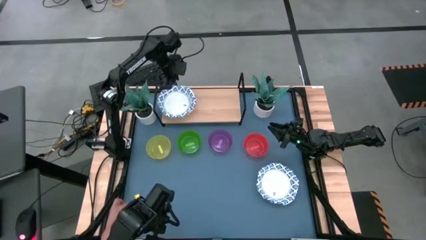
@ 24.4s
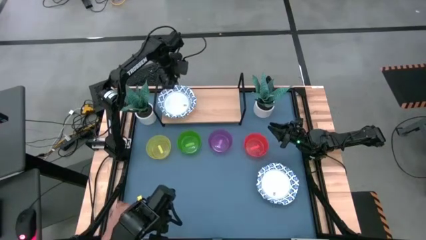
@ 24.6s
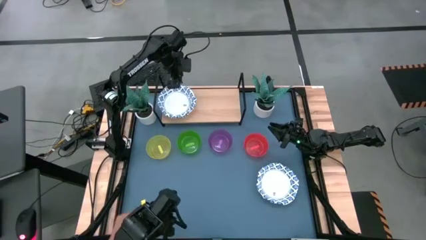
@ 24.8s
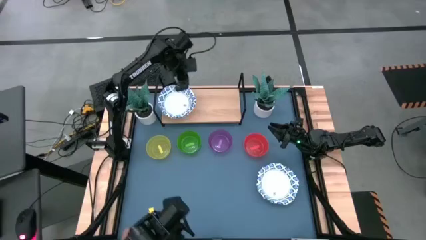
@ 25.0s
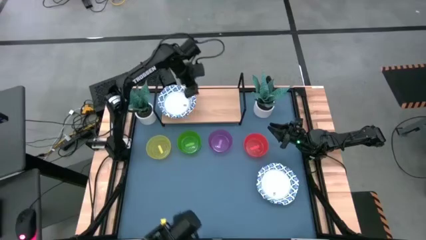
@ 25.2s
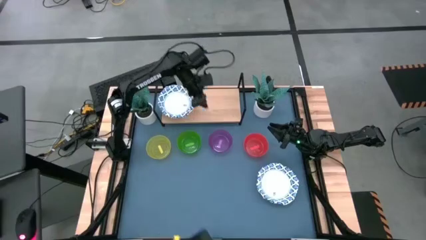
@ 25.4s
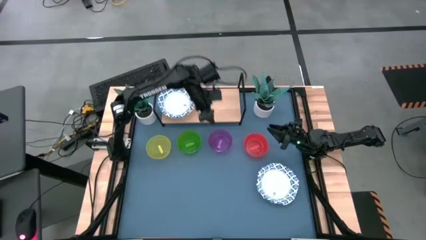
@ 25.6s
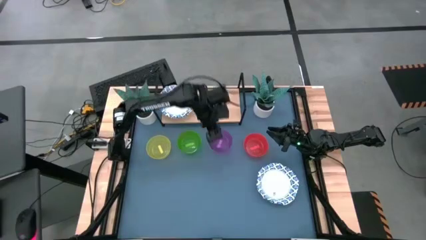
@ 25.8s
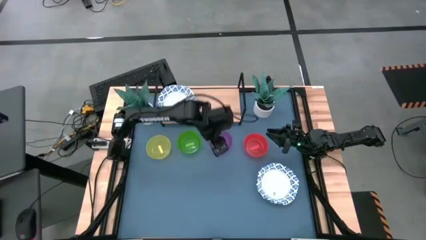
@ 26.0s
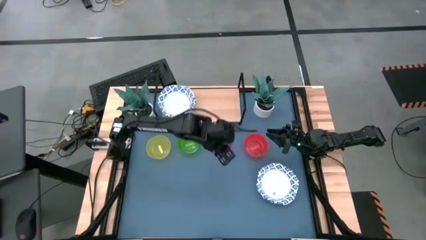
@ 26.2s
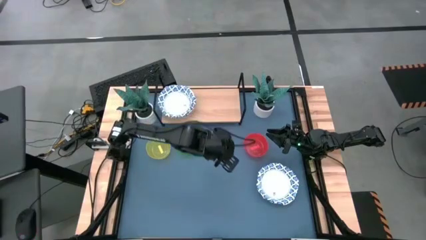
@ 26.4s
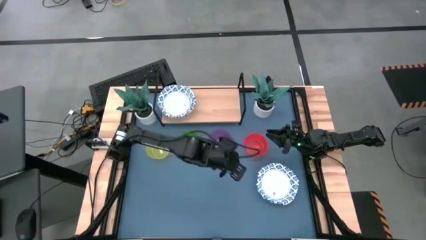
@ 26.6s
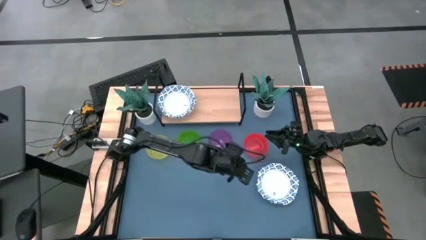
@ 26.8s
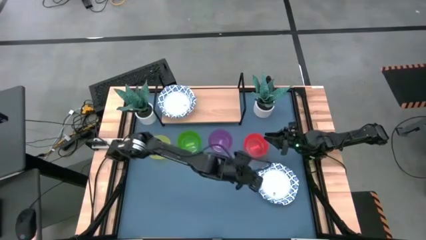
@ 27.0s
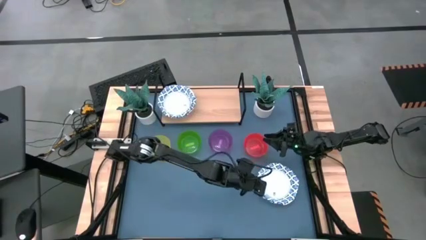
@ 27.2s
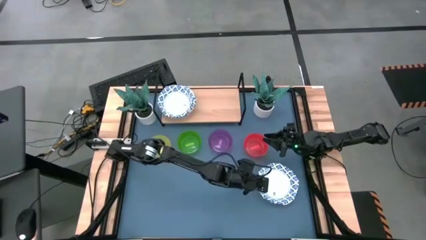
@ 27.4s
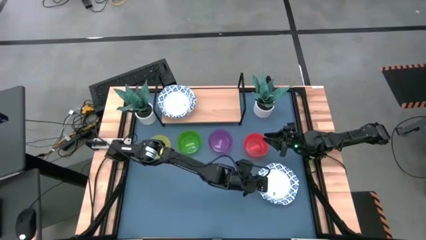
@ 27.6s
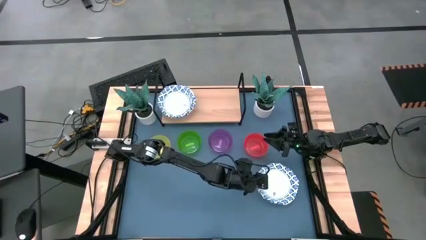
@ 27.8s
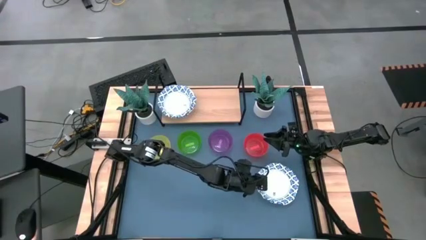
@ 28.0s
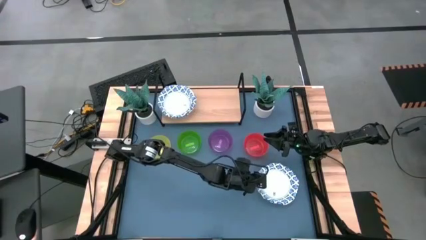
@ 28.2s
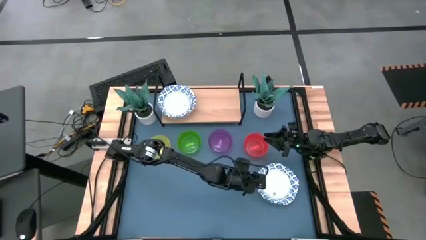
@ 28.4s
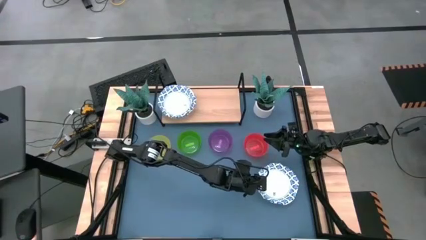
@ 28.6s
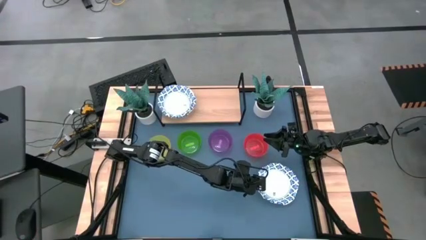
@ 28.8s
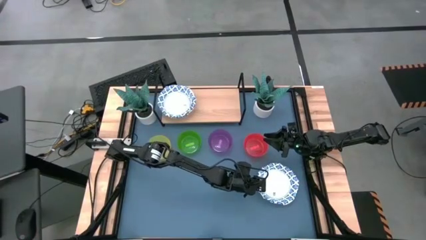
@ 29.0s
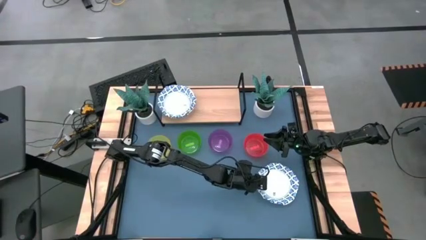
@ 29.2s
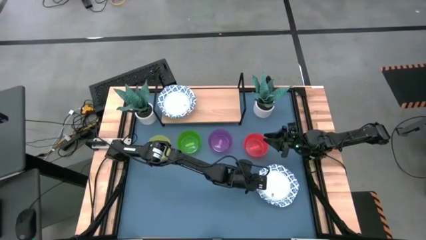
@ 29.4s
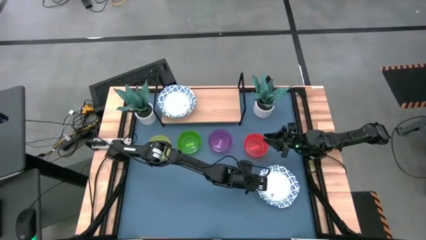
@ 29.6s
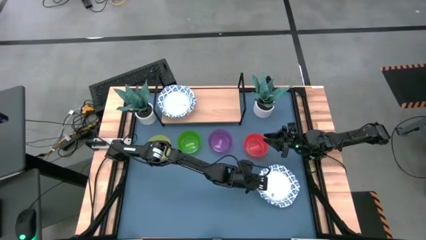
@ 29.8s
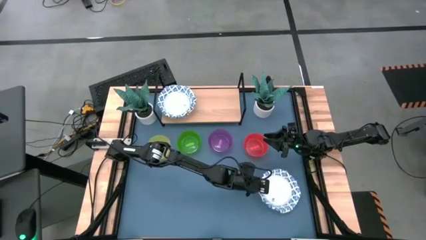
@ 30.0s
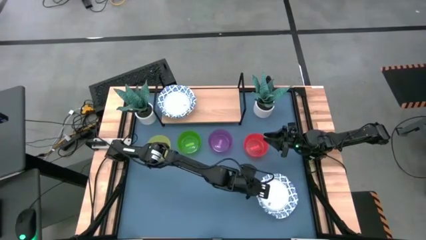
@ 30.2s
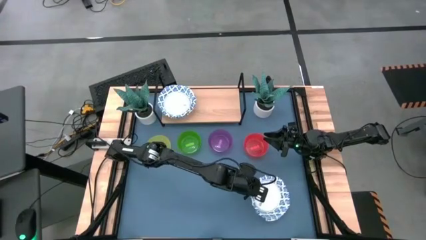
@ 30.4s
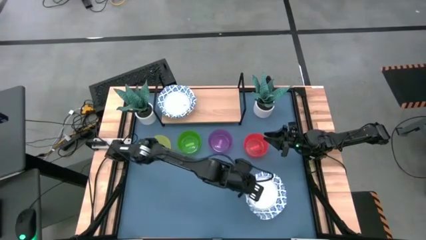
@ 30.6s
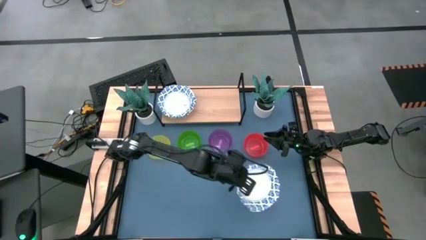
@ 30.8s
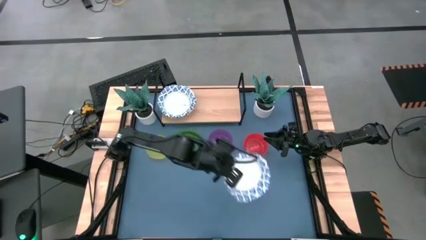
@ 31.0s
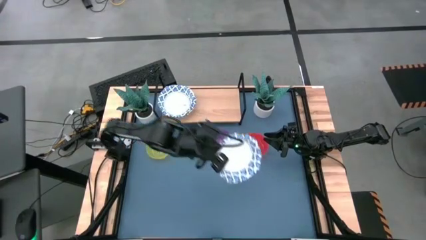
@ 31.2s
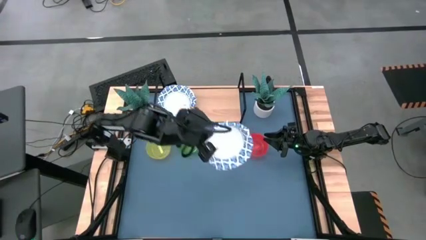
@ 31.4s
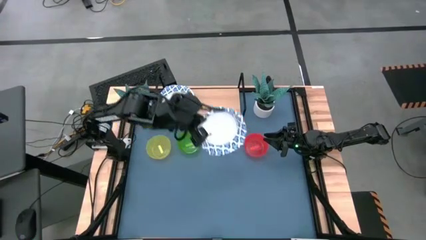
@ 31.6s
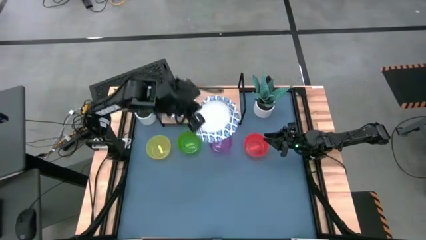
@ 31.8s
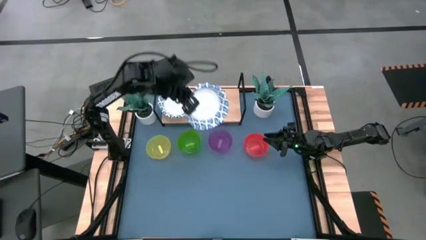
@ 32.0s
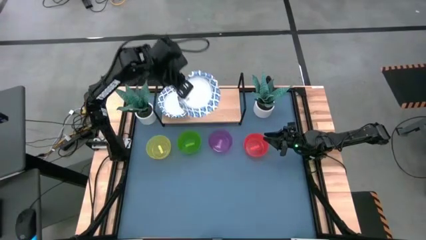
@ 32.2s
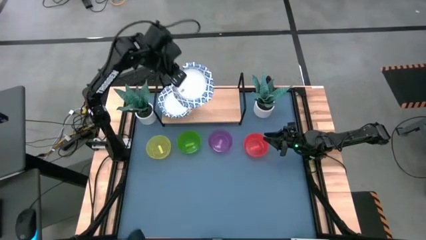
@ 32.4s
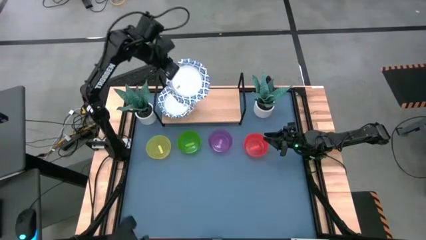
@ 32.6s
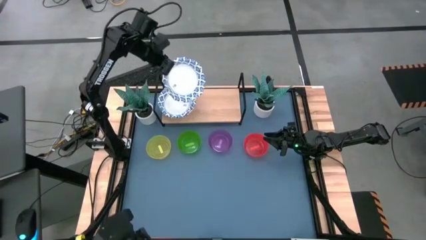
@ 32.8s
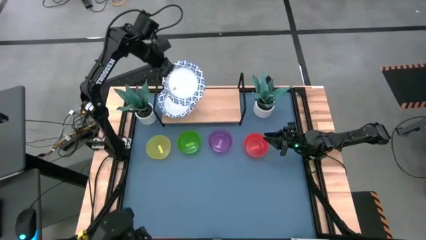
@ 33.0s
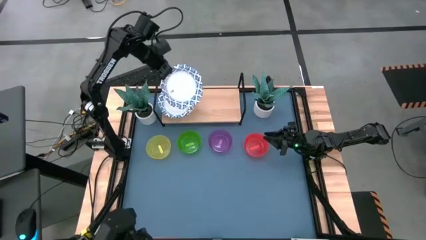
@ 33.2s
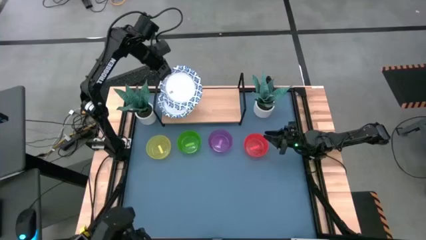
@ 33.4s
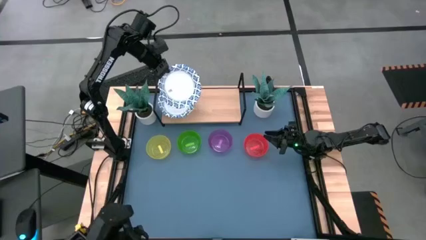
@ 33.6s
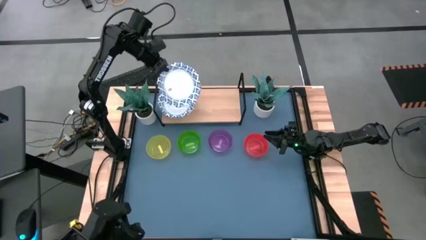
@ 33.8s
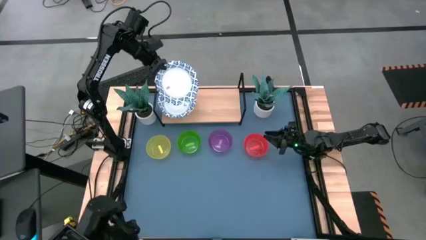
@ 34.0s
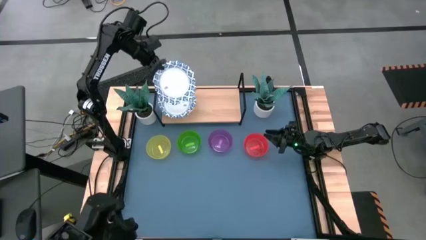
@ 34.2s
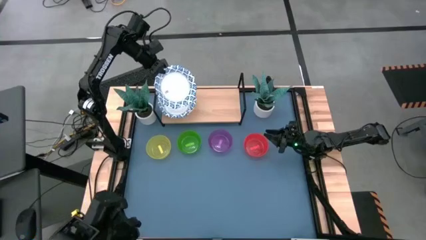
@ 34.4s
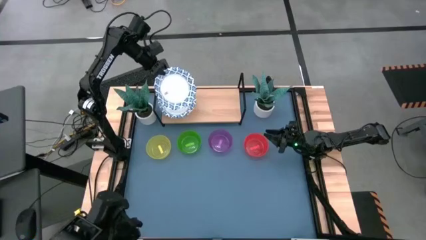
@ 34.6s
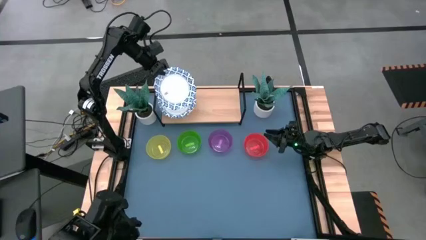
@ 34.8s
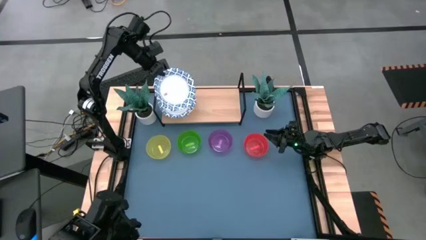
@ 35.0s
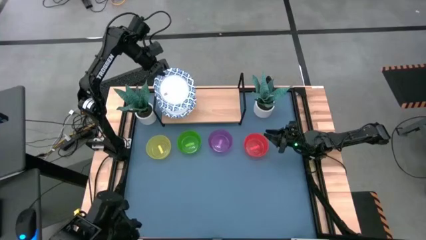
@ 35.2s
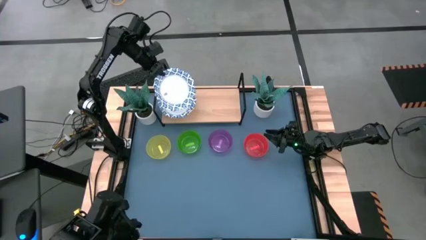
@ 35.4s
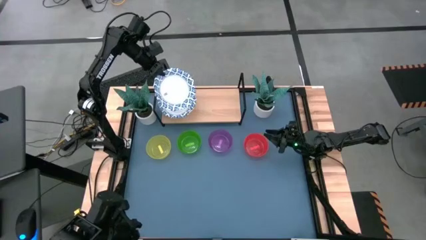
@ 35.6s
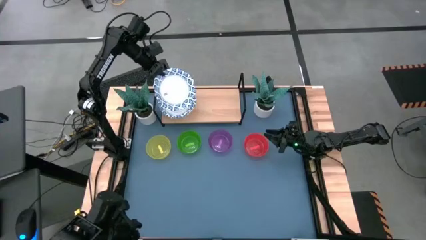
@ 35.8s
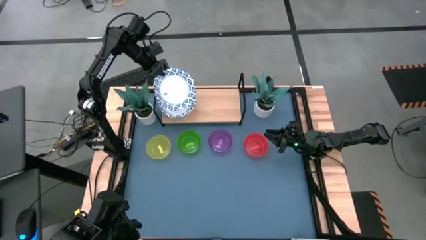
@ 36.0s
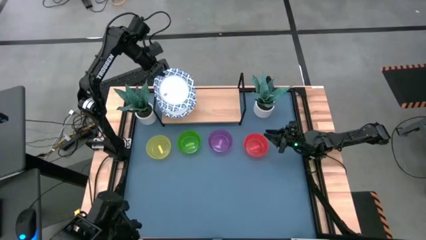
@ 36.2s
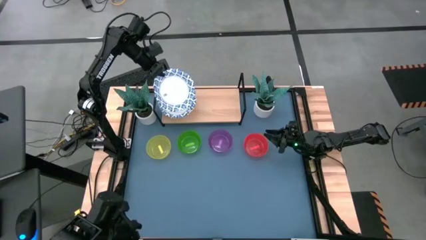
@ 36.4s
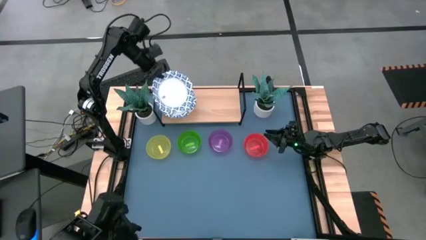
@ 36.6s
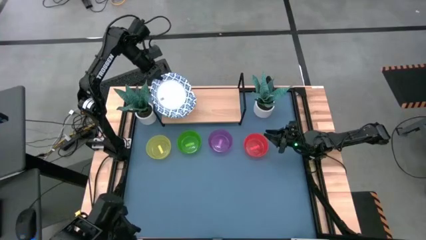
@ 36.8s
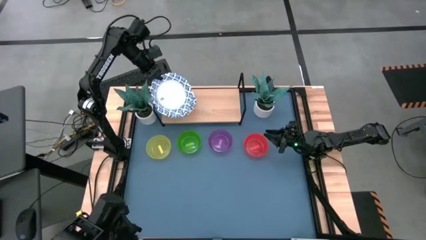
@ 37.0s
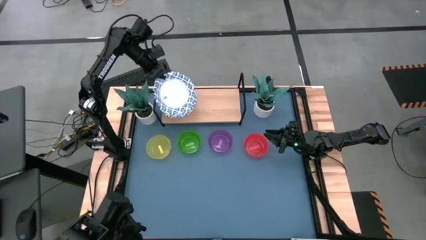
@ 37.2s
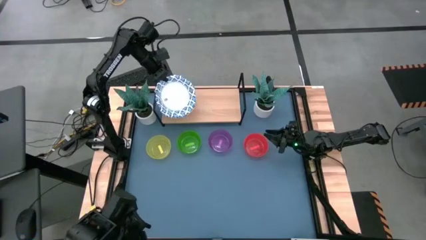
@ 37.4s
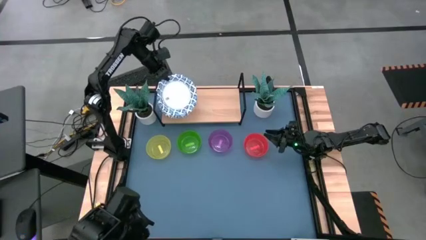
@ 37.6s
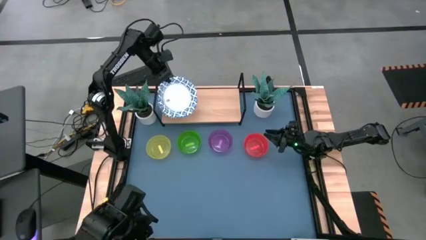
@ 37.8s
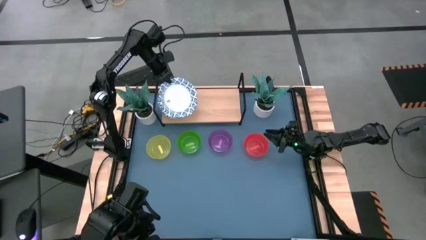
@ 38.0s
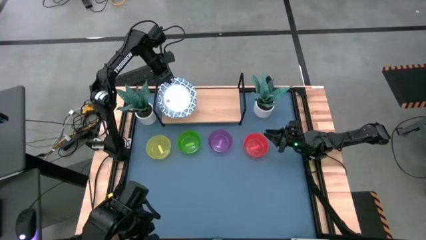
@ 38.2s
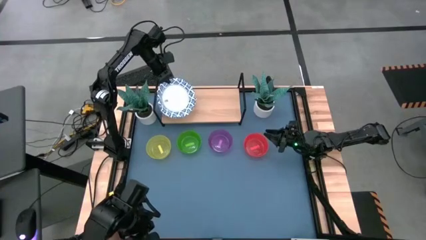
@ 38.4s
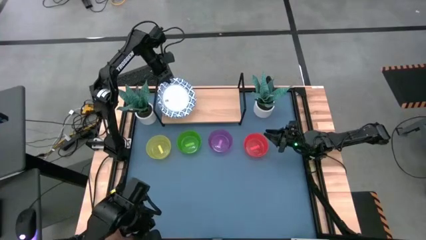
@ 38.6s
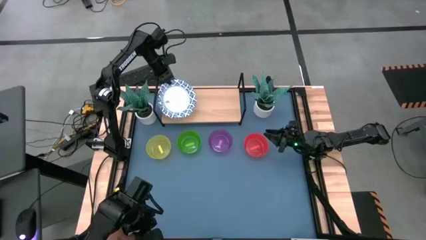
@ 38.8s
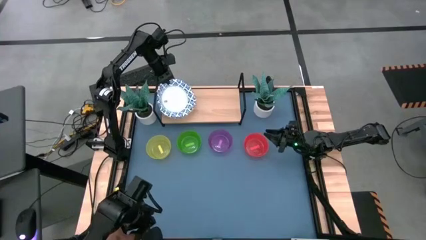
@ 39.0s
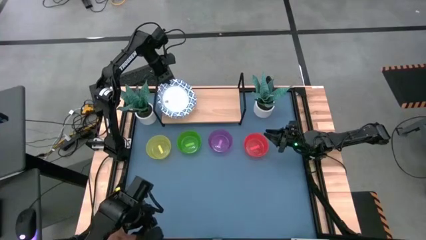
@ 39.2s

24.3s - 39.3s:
Task: Place and stack bowls onto a shelf
Stack the white bowl on the top of the other white bowl

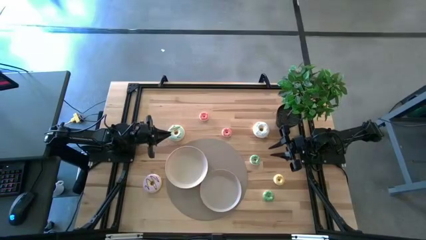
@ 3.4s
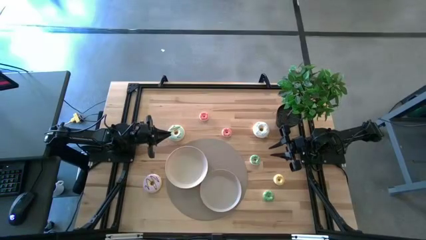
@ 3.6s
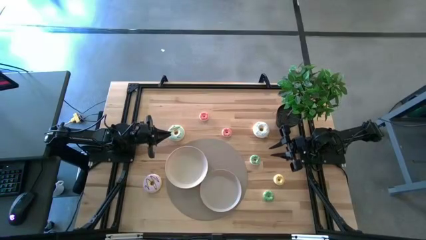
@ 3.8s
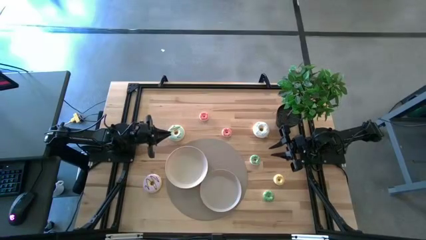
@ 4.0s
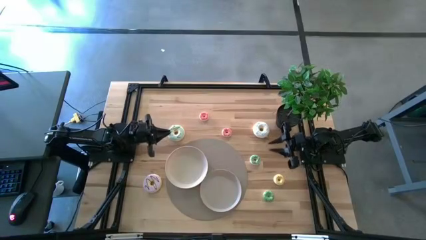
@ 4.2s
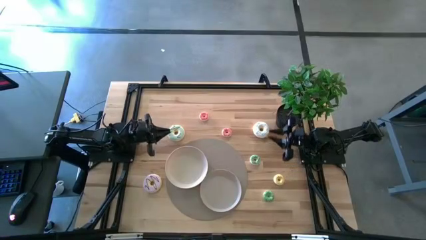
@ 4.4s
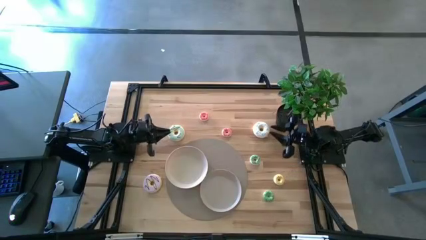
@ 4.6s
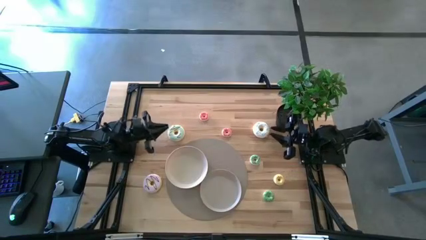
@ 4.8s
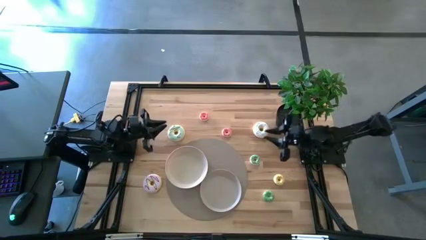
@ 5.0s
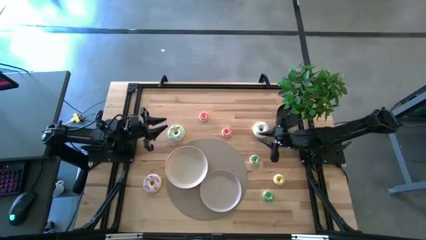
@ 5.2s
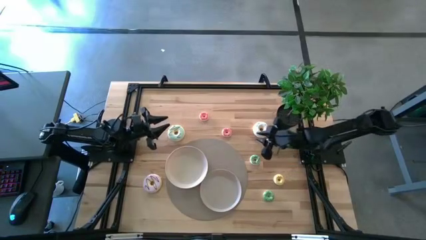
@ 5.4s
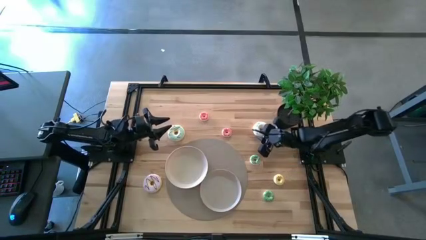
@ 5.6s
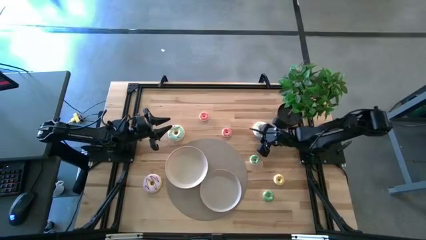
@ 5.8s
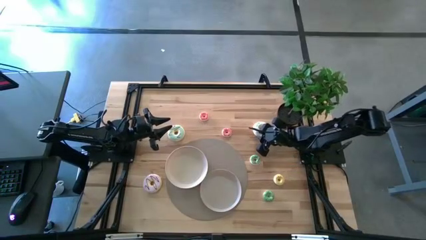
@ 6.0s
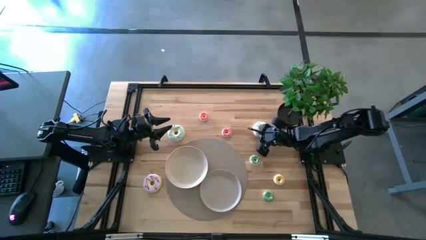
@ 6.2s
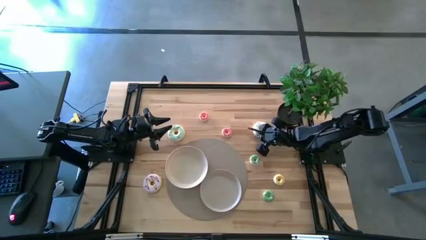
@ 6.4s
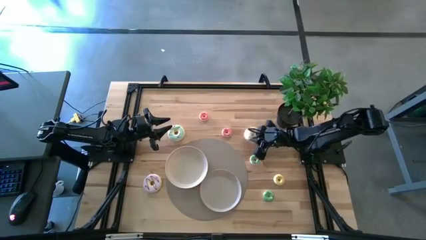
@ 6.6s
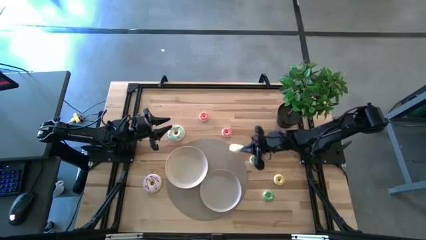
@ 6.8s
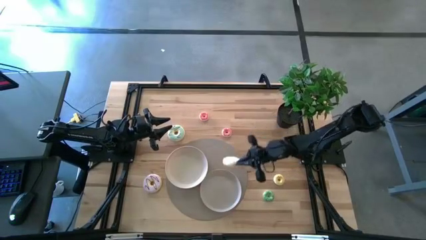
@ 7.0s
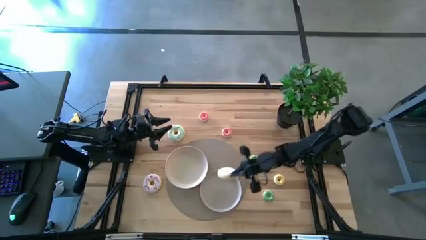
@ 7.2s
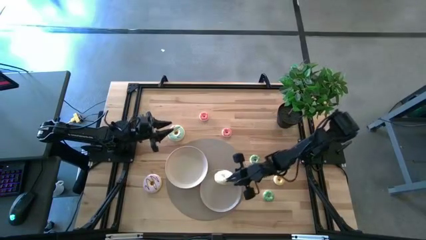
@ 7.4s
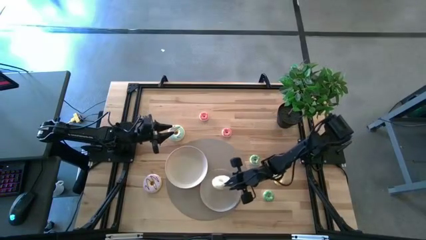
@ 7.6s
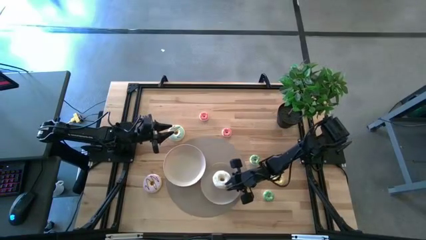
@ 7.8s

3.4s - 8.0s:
Task: Pick & Place donuts
Put the large white donut on the bottom white plate
